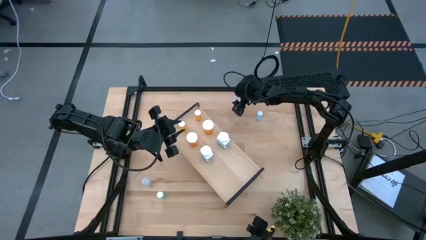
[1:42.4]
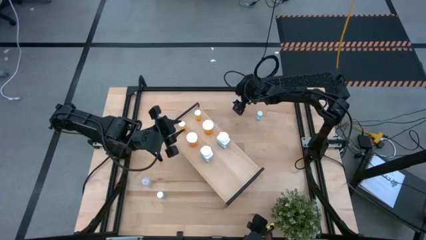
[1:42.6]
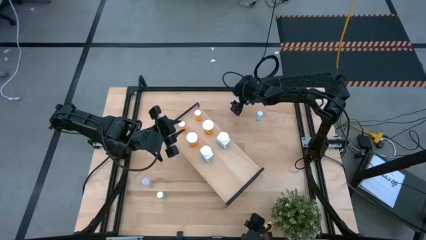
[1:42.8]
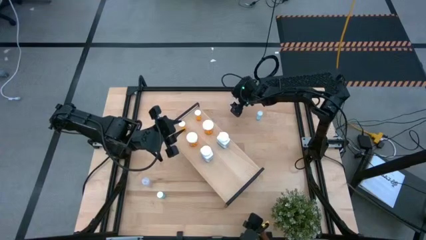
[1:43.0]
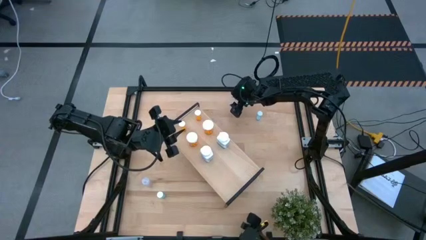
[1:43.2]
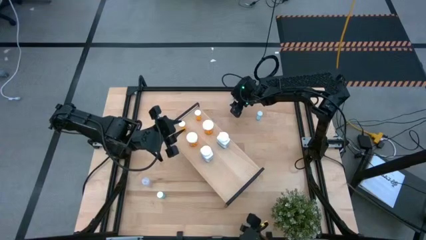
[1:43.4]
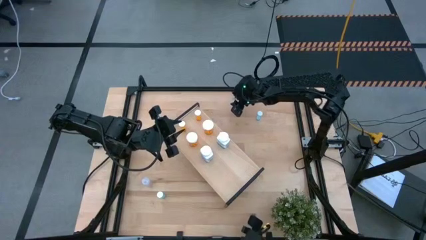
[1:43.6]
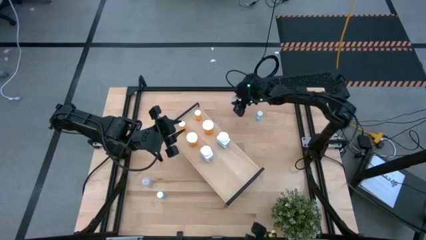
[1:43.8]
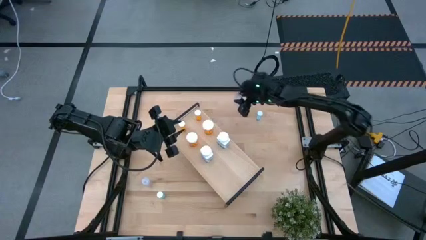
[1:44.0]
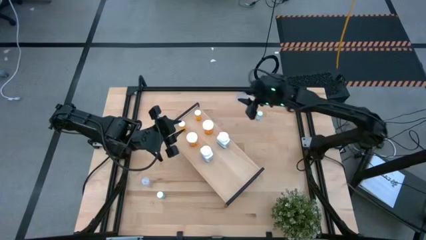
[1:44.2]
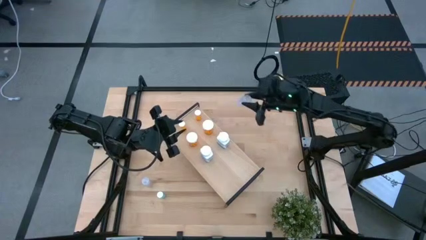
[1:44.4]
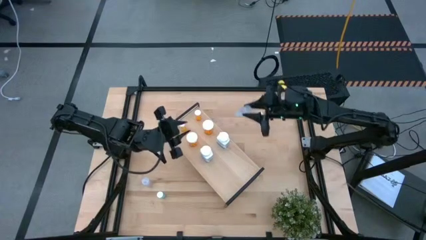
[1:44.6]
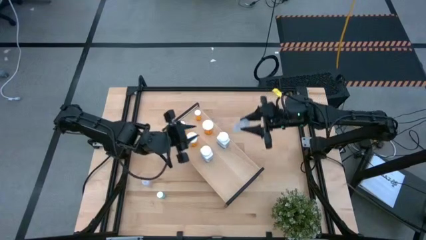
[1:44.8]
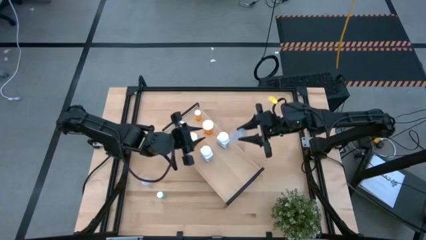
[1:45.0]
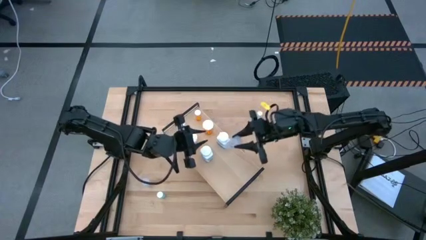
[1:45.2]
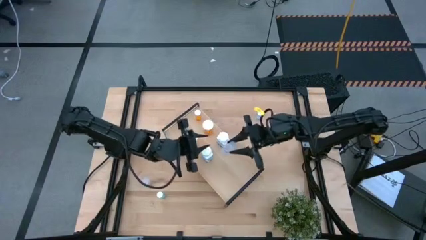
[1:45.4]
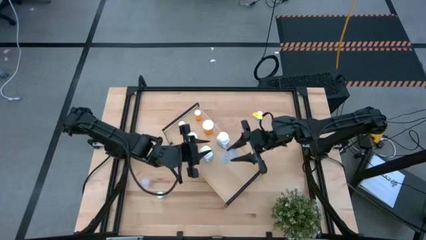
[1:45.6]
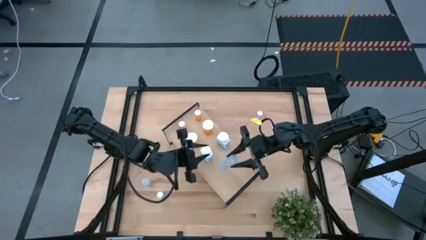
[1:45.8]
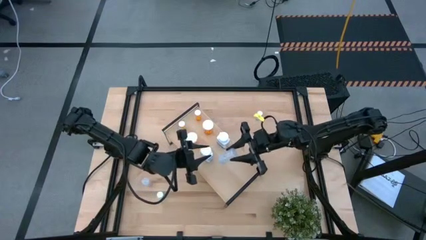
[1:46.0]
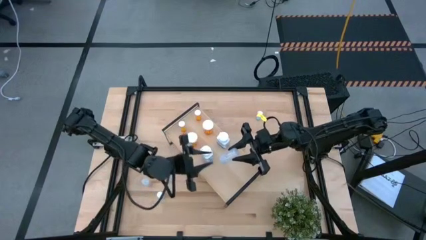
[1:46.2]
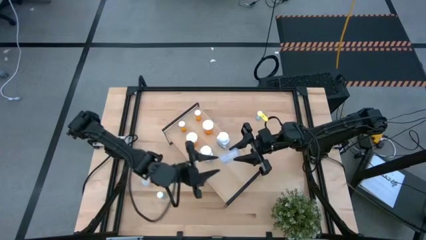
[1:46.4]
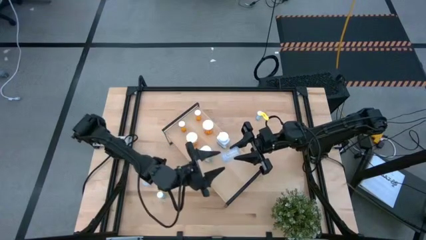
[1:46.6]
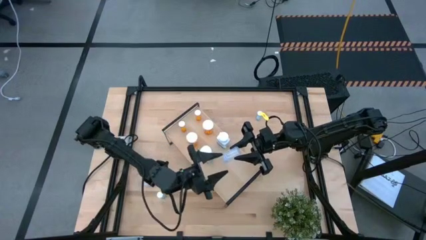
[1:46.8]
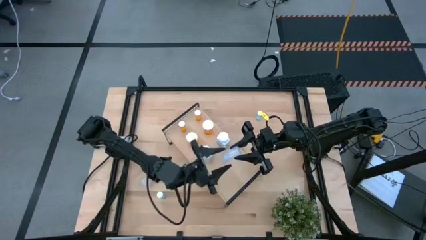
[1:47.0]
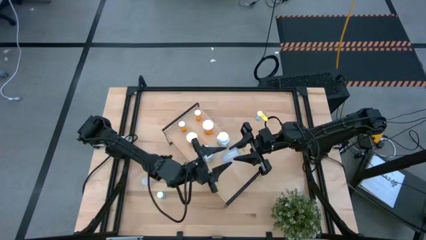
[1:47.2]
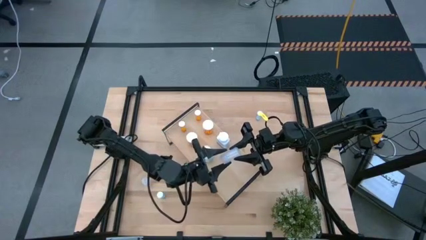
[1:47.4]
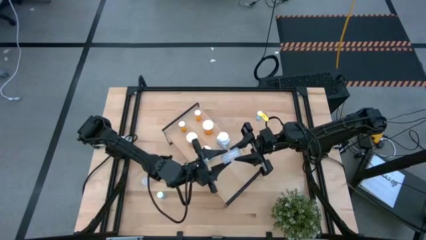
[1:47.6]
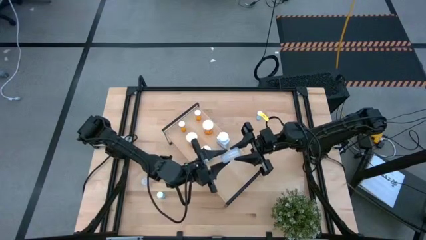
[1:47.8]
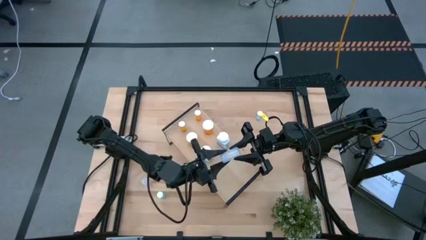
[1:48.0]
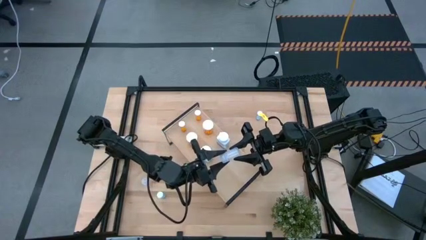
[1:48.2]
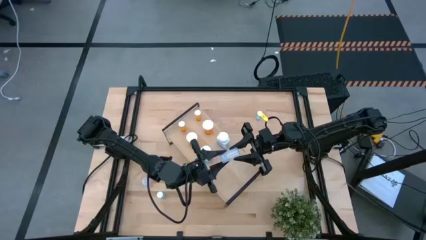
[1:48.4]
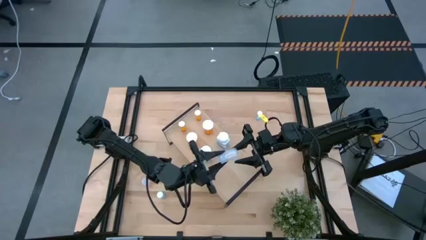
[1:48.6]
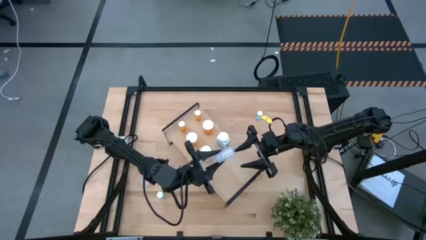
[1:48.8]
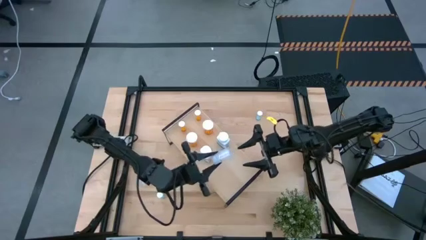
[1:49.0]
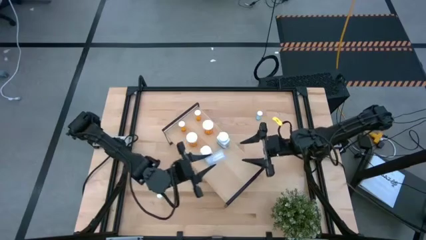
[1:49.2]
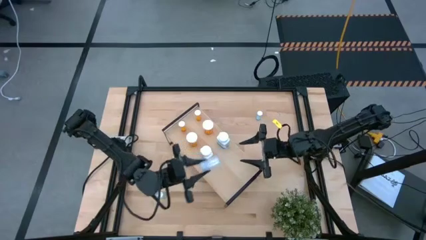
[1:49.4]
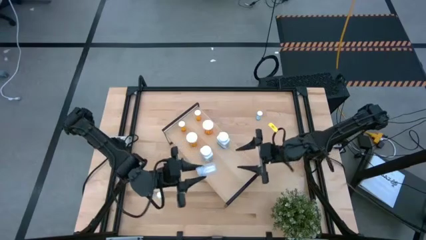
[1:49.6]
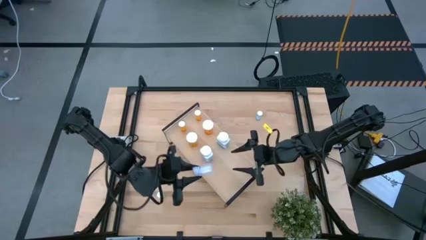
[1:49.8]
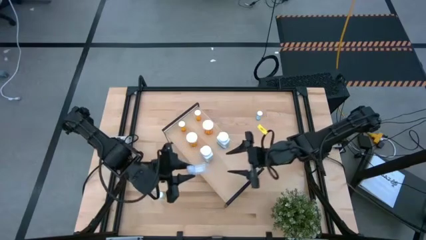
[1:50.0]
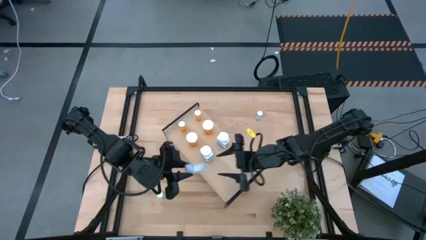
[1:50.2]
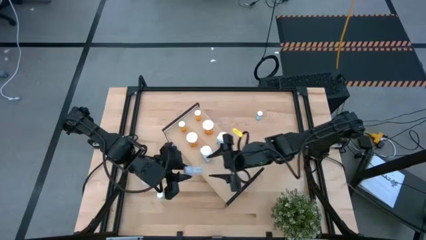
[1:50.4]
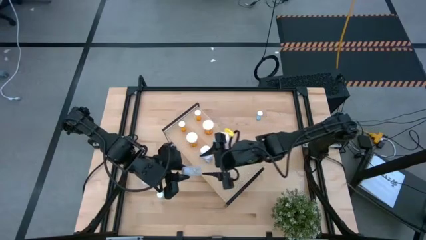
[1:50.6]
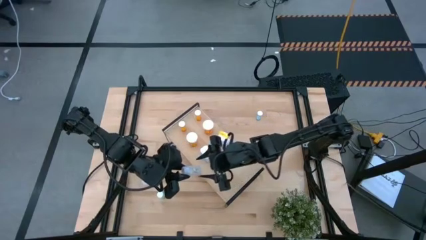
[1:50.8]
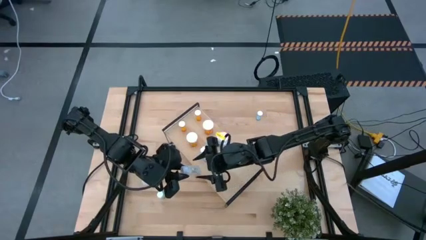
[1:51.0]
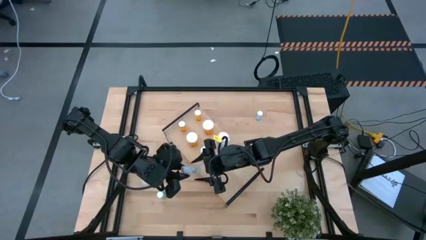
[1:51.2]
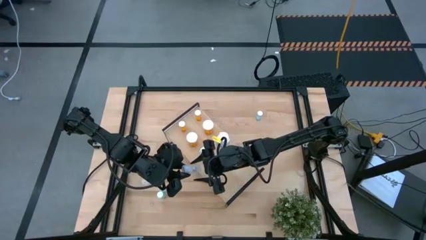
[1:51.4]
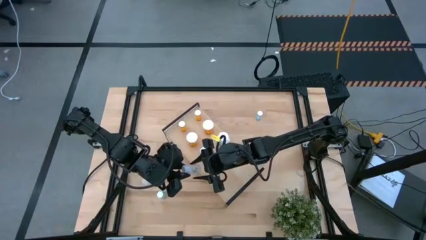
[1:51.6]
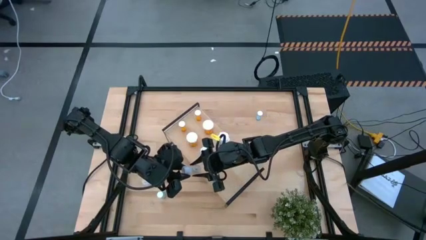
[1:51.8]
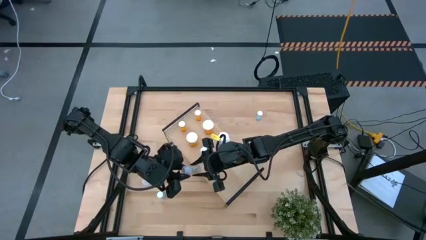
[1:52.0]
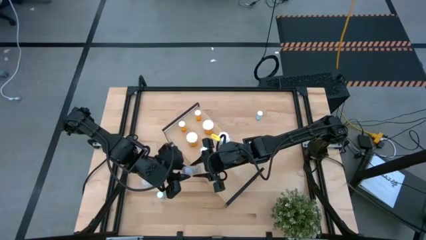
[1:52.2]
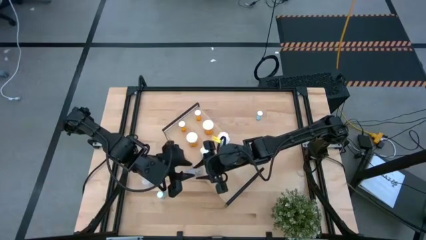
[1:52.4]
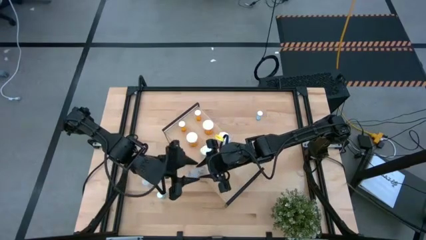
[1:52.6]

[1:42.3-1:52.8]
Task: Pick and place medicine bottles onto shelf by color
Put the top transparent pill bottle on the shelf
